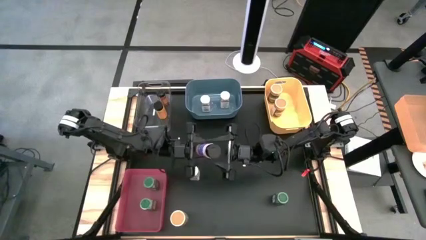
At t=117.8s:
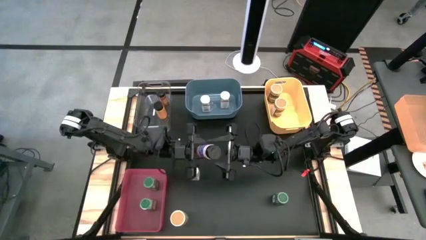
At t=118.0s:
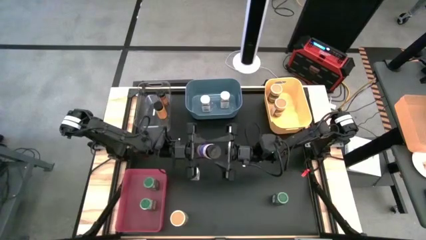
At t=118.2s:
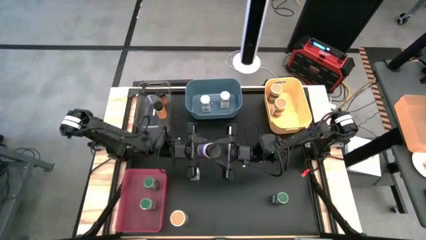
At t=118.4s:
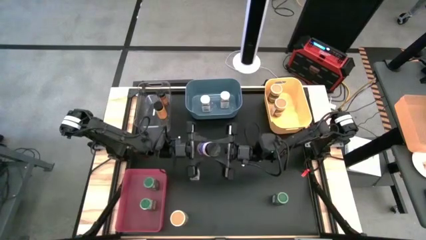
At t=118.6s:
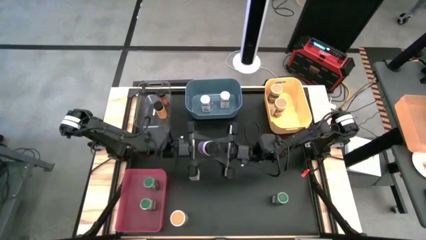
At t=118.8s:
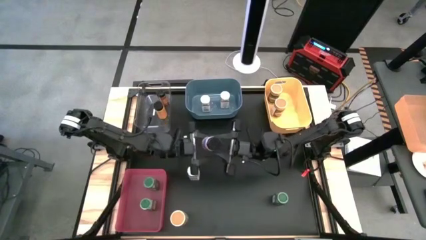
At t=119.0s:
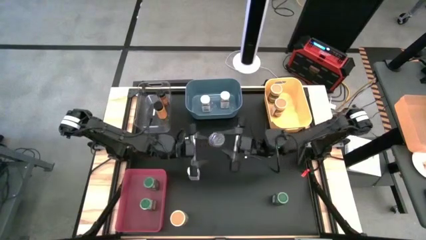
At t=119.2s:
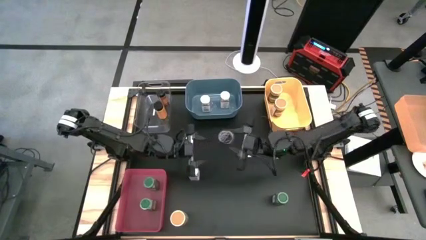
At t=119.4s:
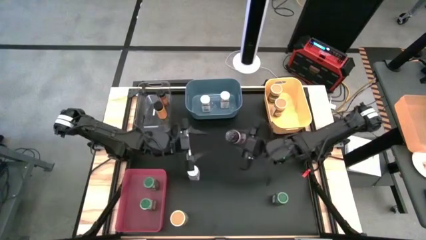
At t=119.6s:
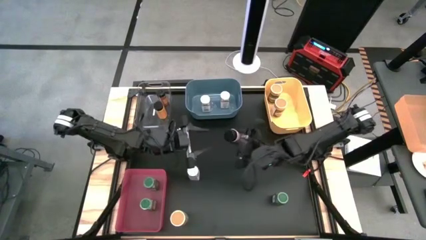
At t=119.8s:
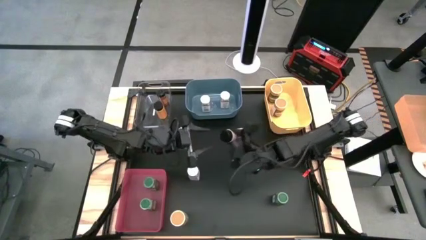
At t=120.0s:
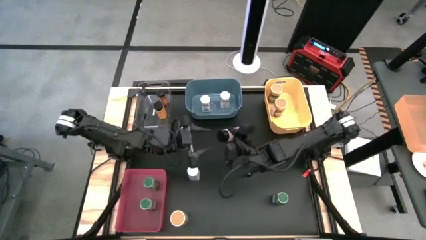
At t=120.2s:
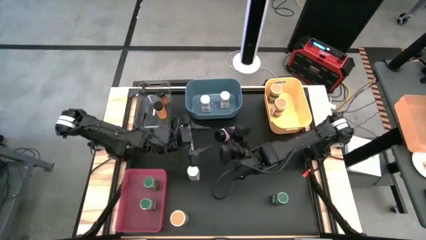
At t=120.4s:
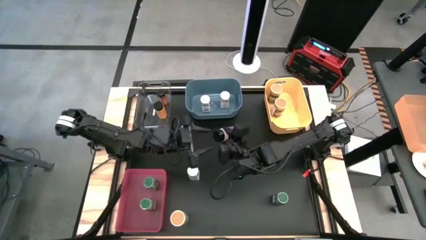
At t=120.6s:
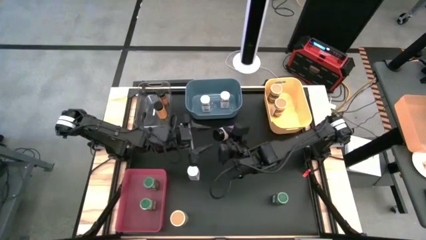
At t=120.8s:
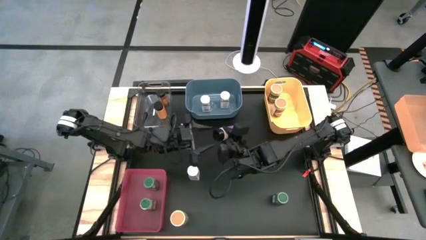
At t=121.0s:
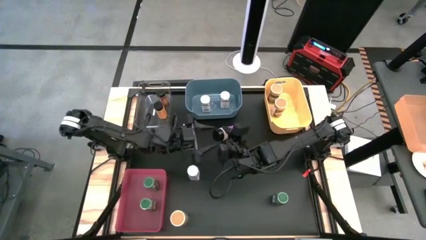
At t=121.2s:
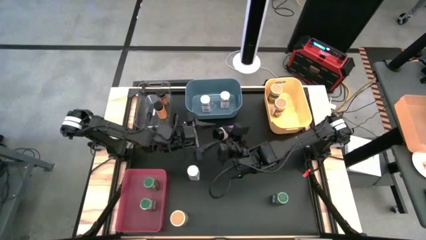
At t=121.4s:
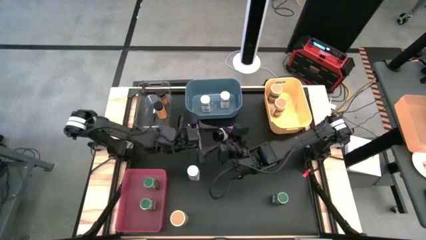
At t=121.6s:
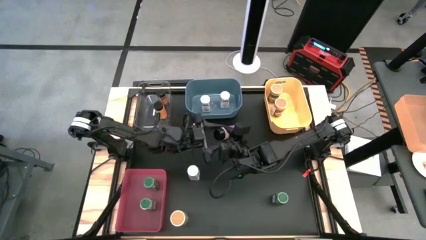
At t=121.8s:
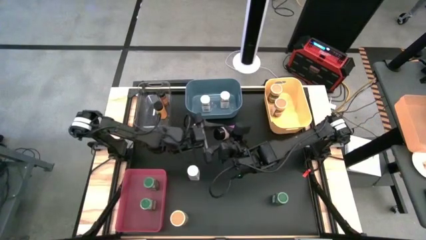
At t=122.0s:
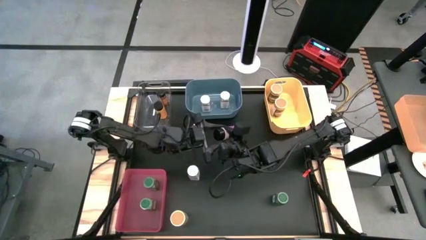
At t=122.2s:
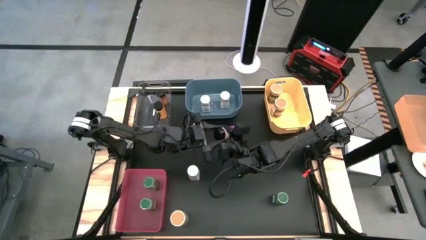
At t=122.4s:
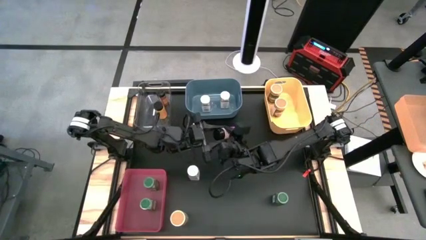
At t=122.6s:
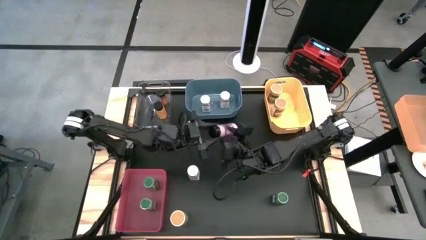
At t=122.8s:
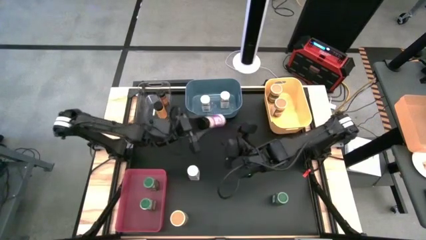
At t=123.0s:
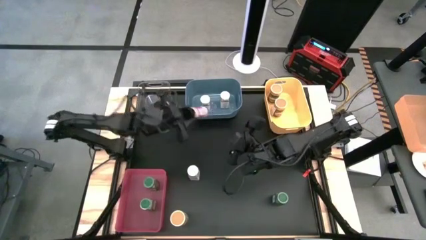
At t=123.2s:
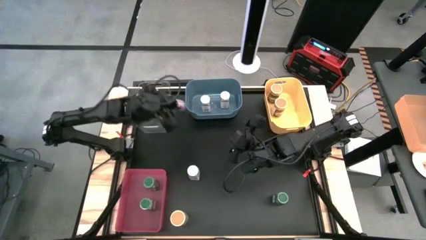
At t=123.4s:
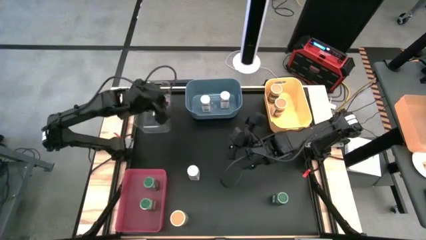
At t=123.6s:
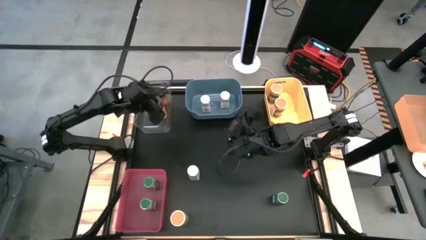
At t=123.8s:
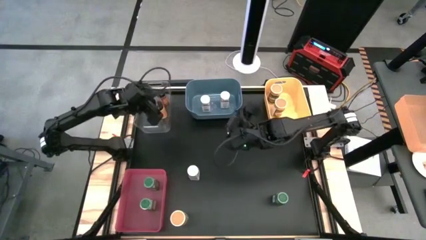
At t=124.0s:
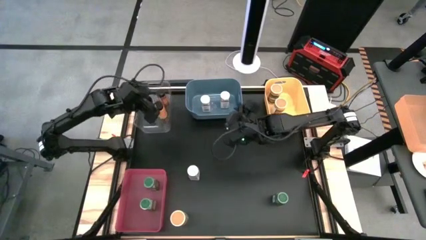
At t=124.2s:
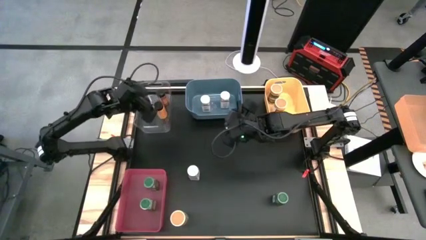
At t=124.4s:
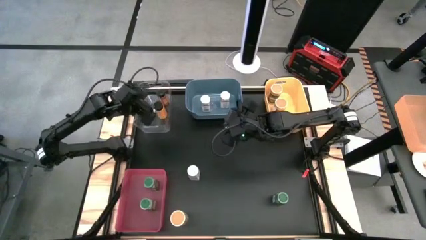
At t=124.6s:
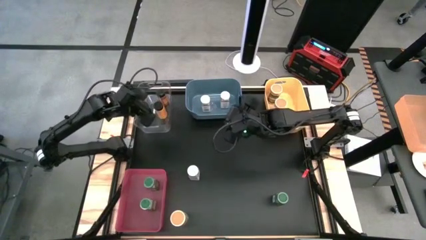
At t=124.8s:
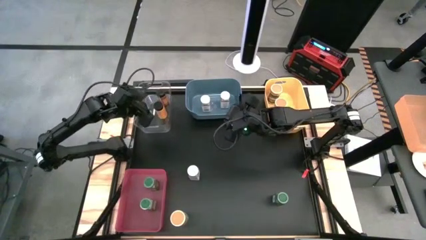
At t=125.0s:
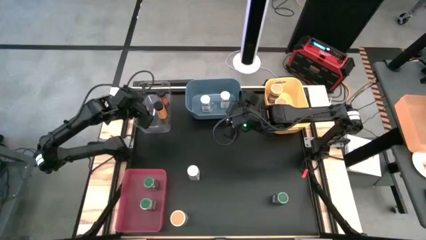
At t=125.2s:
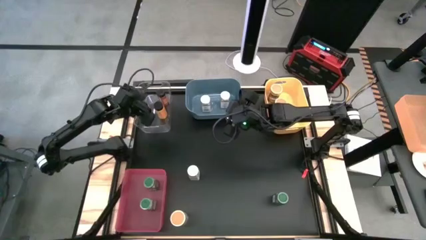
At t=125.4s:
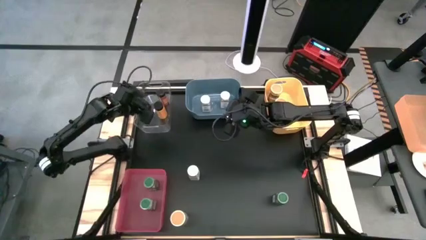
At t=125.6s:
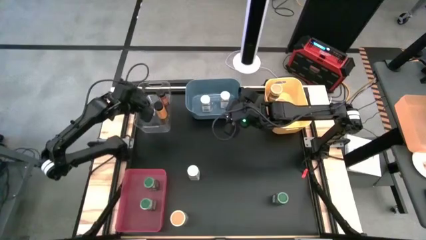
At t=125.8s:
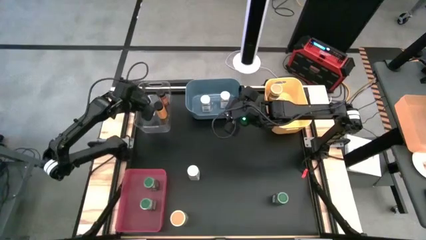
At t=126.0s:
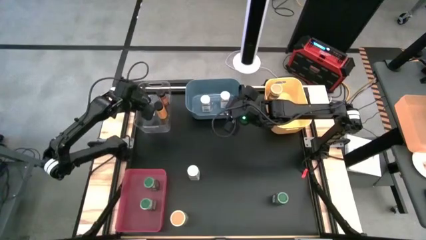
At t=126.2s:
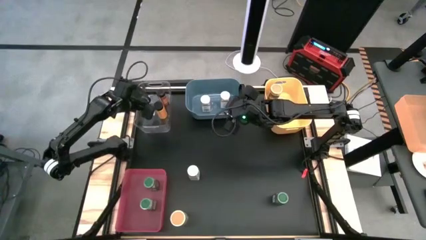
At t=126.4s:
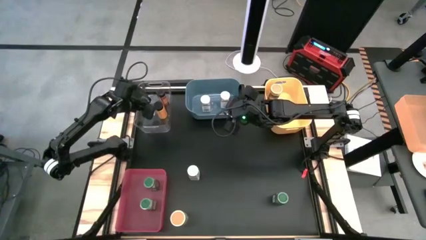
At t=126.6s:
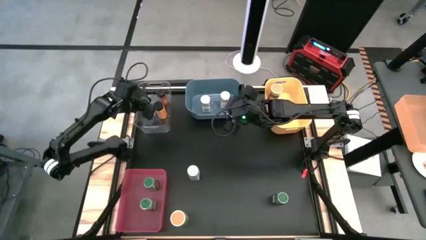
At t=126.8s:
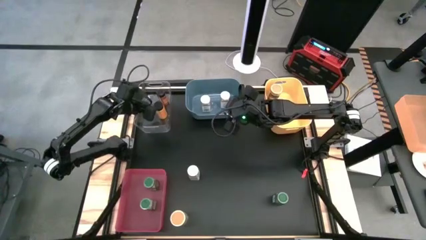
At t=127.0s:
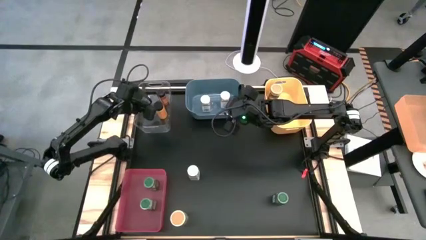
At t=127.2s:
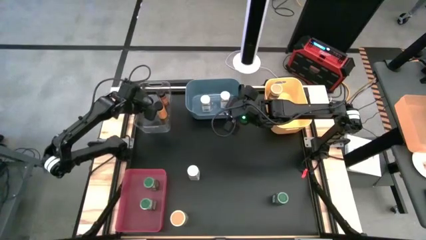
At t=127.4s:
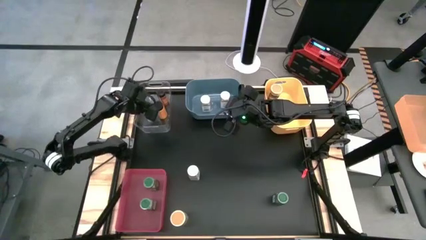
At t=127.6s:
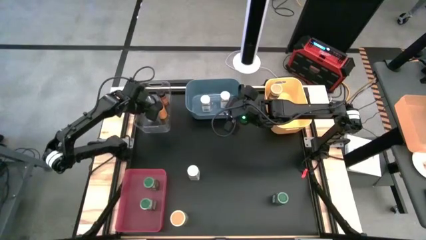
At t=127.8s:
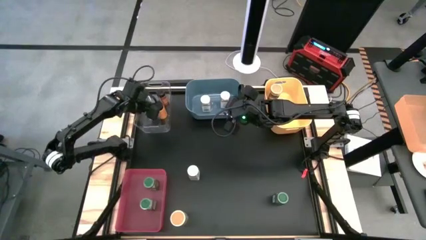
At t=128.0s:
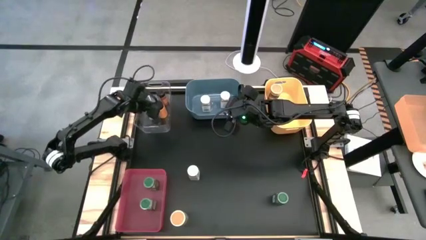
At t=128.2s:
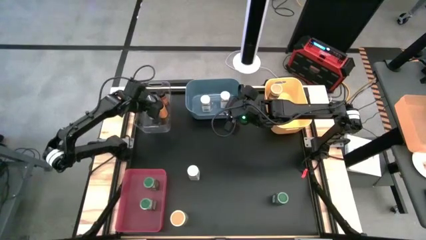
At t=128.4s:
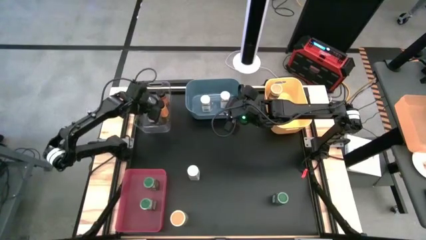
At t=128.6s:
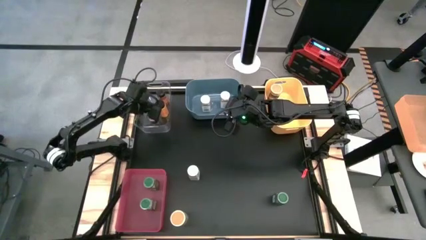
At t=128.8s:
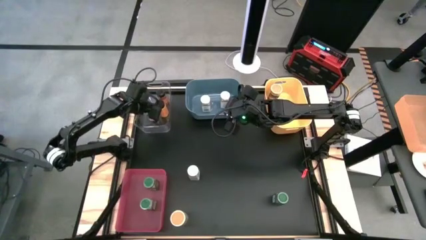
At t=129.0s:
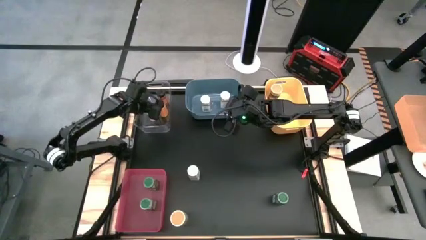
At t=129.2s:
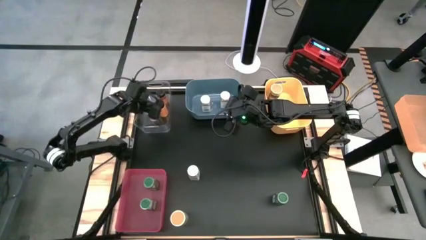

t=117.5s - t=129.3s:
Task: Sort spices by type
Put the black seasoning bottle into the transparent bin

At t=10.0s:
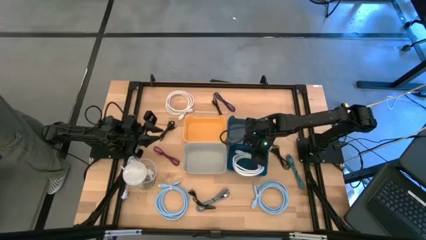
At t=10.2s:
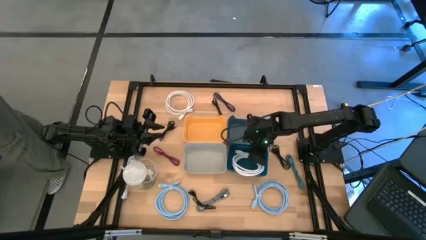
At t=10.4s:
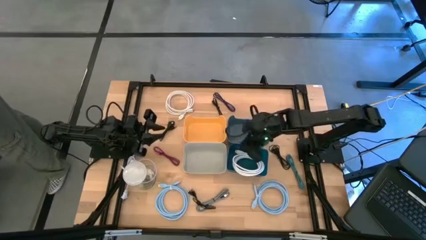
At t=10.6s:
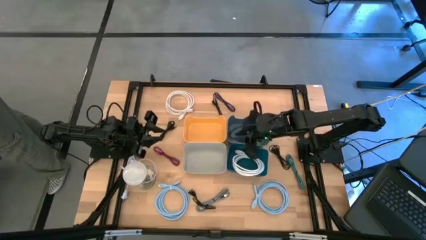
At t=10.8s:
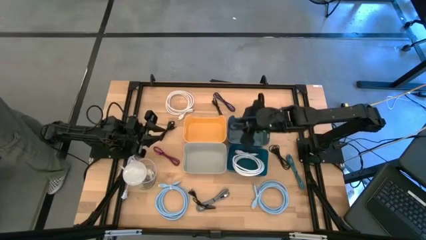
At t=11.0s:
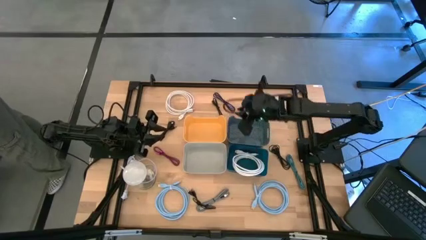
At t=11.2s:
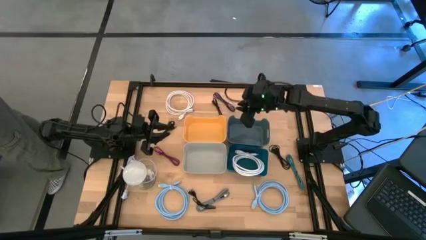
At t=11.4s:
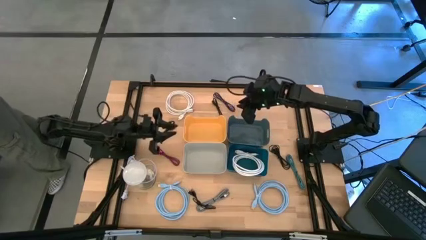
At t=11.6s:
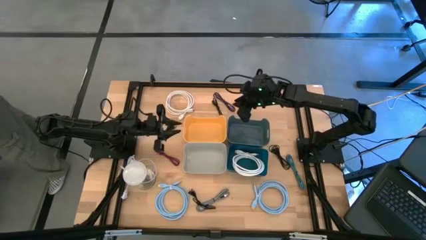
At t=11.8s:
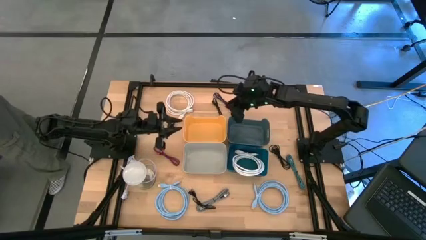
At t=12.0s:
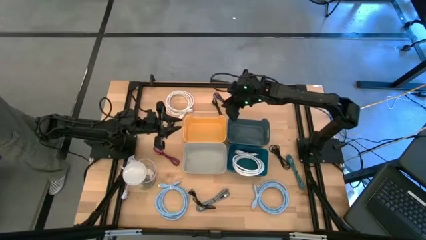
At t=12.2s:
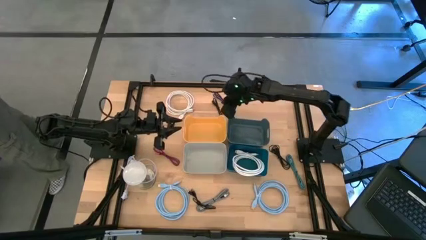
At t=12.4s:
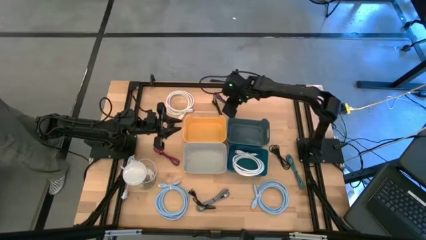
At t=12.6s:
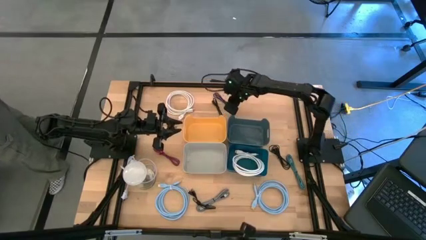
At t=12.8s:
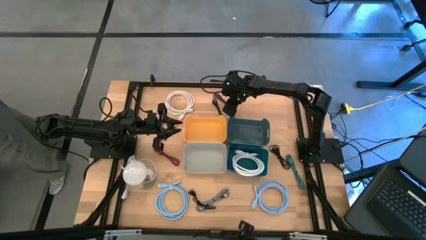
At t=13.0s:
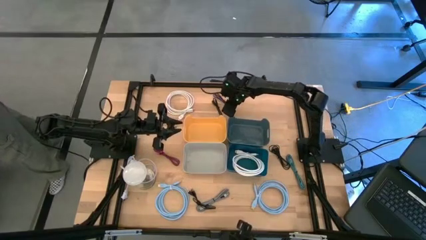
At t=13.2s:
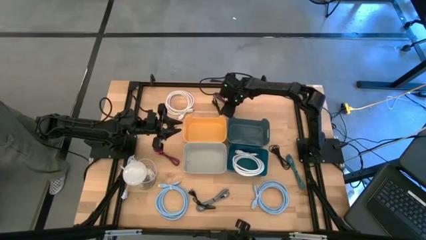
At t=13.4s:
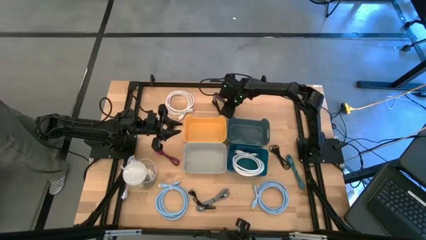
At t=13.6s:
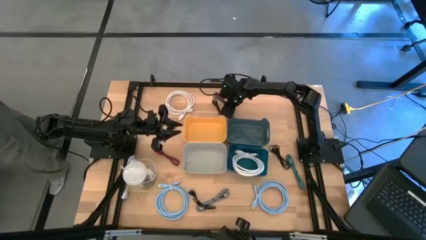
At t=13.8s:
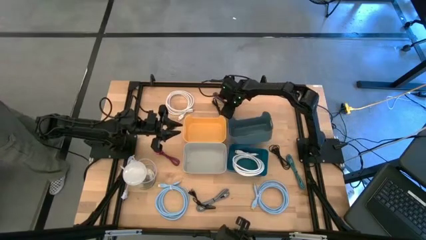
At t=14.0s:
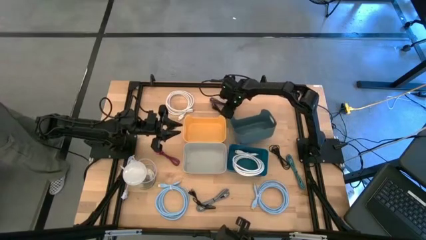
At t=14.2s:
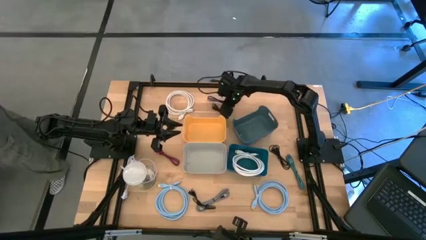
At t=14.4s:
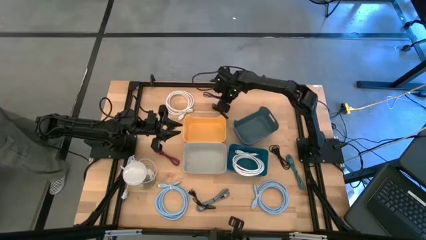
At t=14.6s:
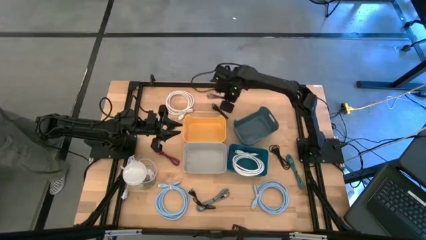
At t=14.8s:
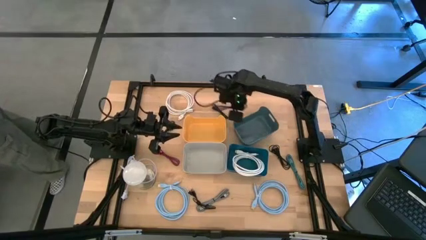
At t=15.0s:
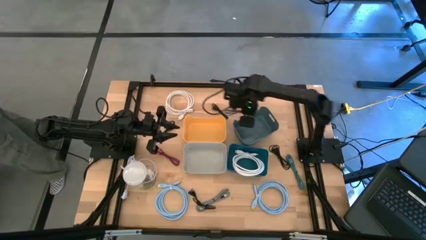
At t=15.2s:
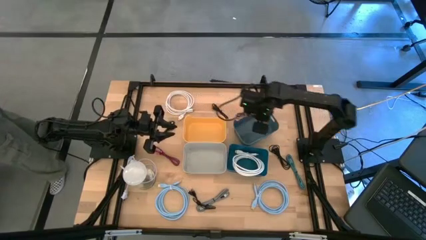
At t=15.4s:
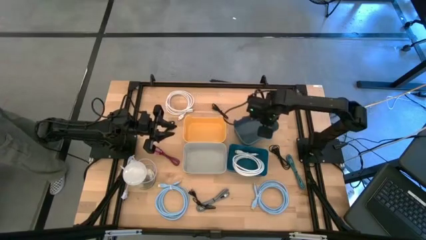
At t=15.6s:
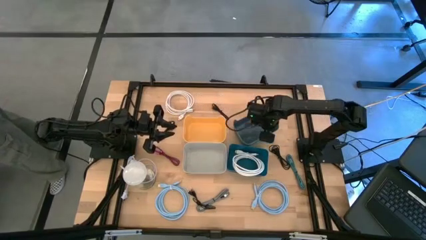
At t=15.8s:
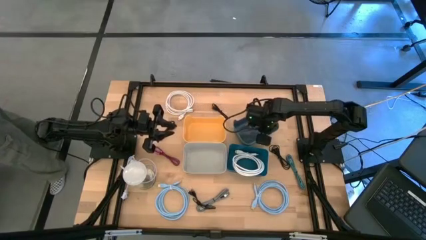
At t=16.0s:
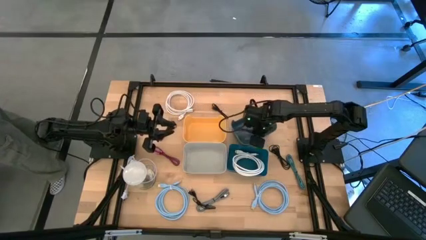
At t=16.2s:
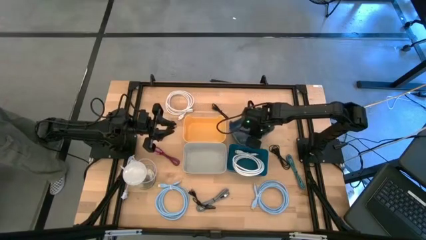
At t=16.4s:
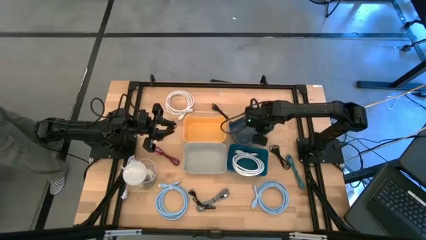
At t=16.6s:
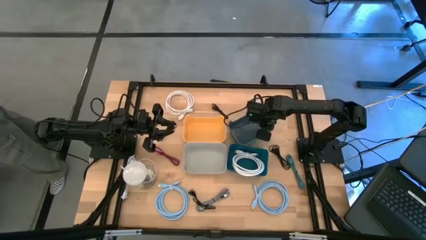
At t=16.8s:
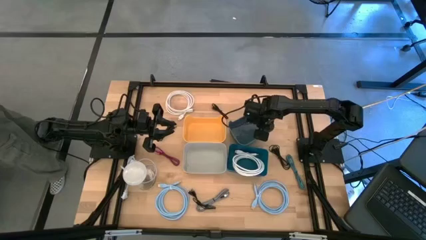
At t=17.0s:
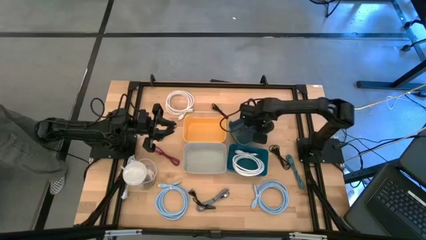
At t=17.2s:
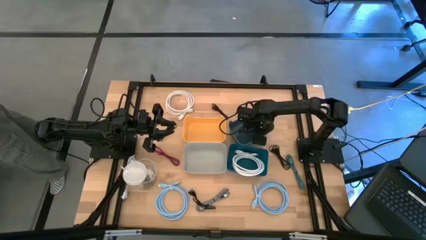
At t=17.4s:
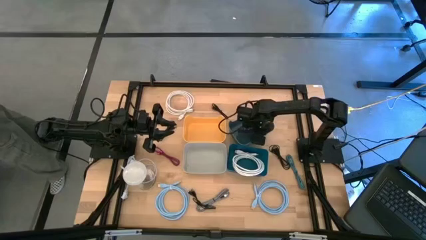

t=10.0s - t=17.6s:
Task: Pick & Place USB Port
Put the patterned purple USB cable into the green bin
